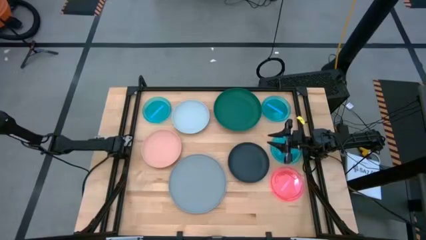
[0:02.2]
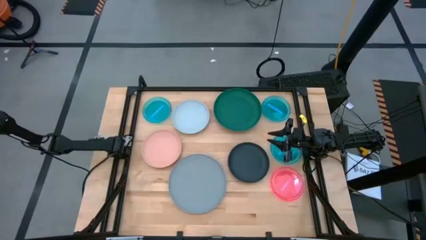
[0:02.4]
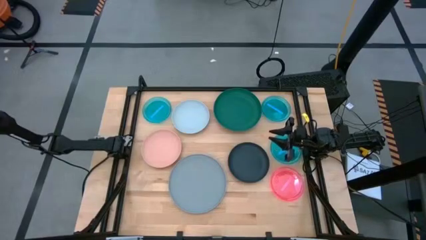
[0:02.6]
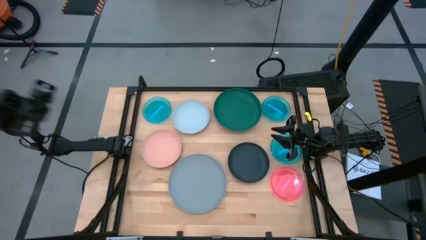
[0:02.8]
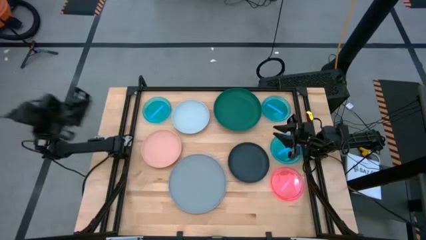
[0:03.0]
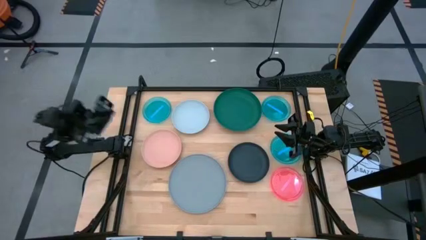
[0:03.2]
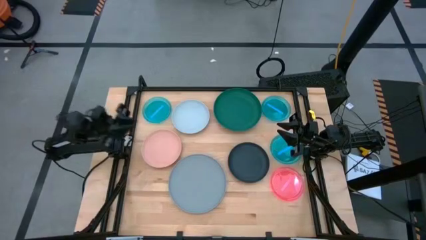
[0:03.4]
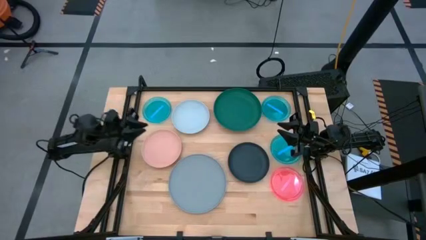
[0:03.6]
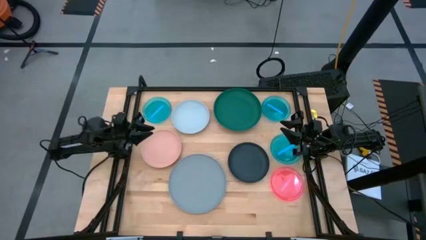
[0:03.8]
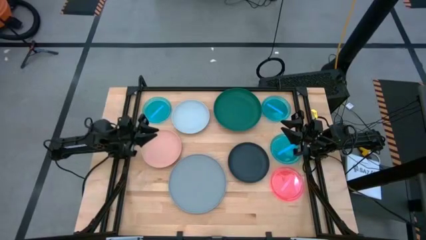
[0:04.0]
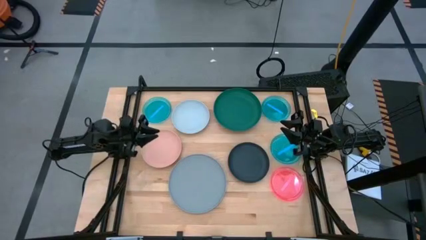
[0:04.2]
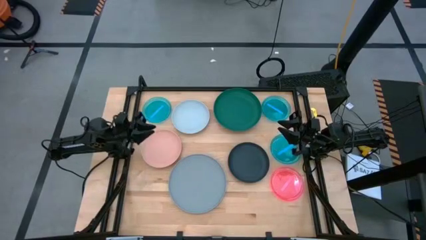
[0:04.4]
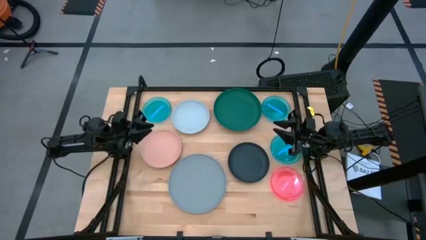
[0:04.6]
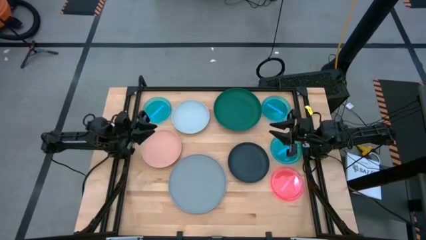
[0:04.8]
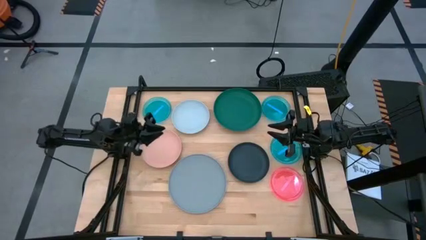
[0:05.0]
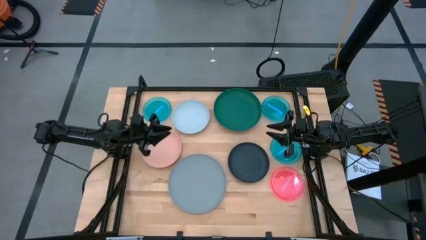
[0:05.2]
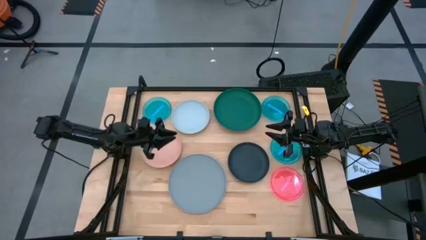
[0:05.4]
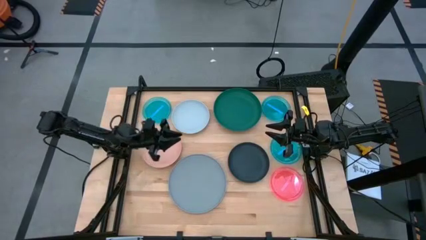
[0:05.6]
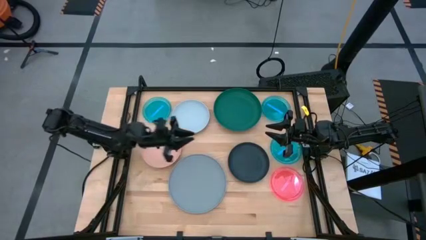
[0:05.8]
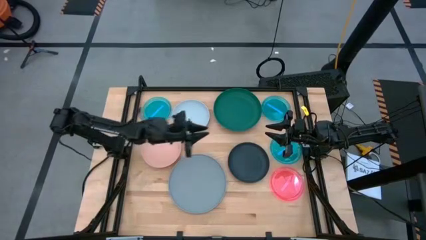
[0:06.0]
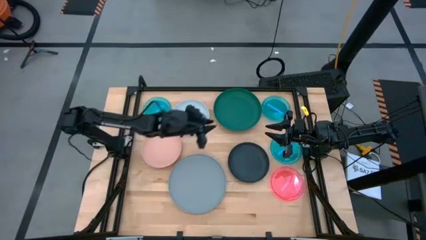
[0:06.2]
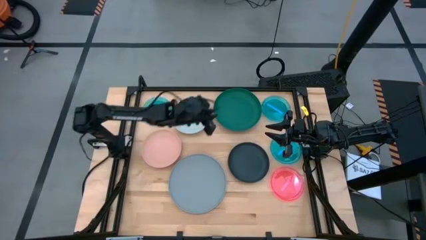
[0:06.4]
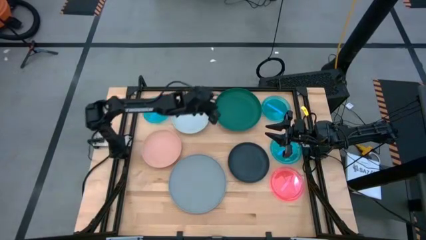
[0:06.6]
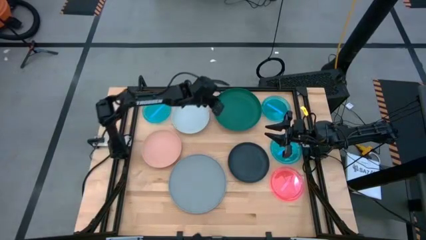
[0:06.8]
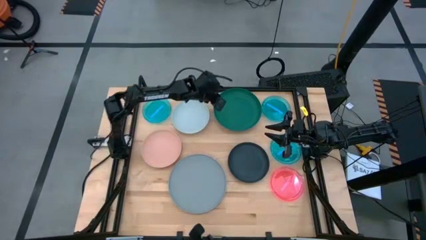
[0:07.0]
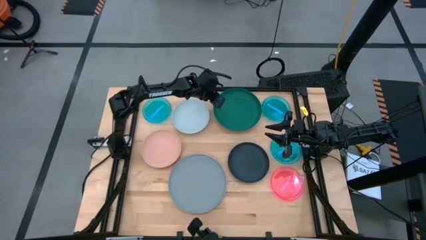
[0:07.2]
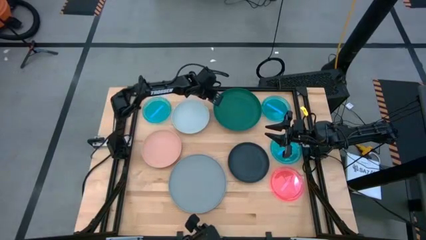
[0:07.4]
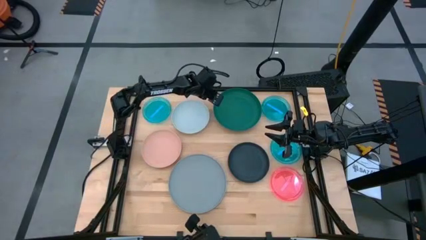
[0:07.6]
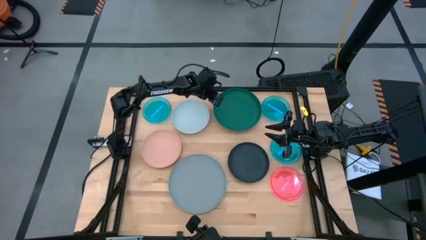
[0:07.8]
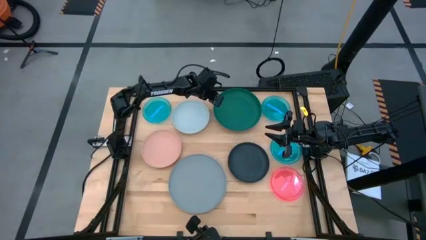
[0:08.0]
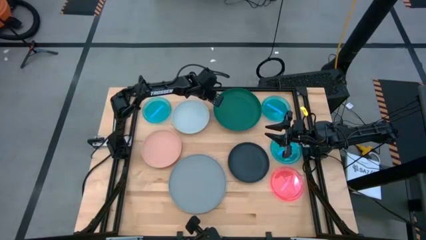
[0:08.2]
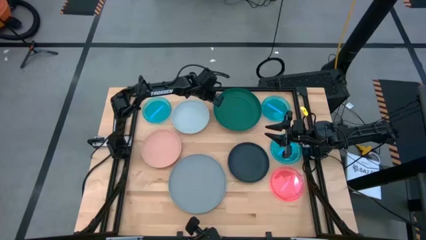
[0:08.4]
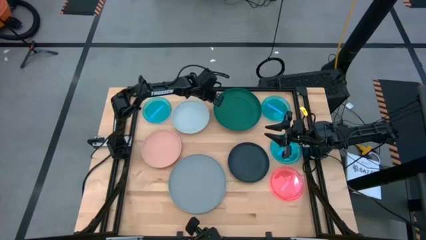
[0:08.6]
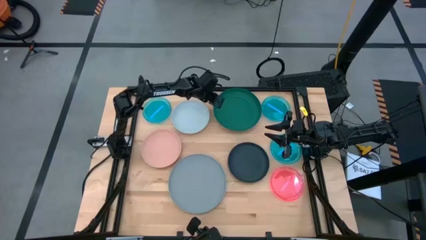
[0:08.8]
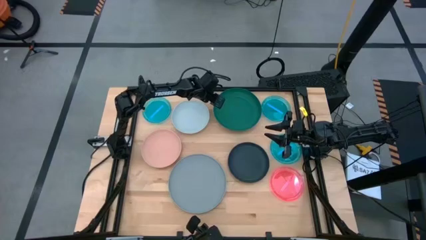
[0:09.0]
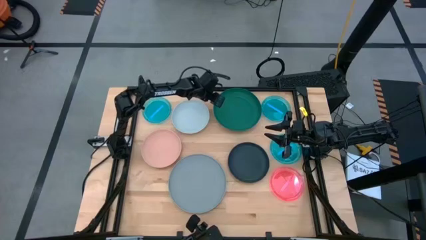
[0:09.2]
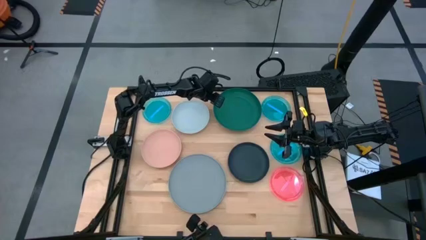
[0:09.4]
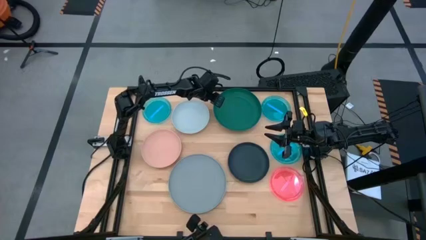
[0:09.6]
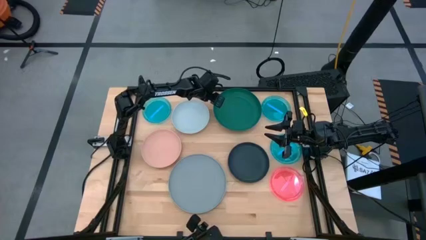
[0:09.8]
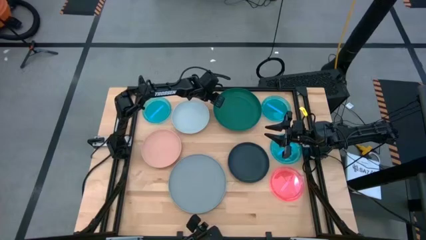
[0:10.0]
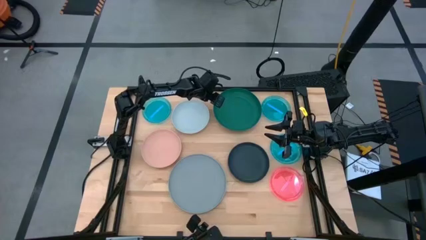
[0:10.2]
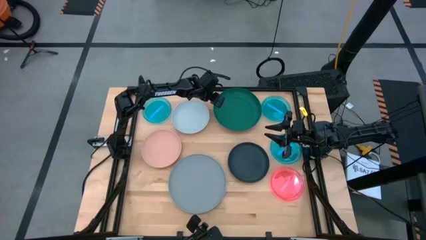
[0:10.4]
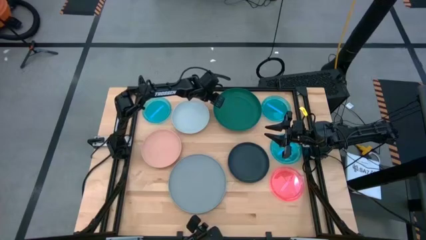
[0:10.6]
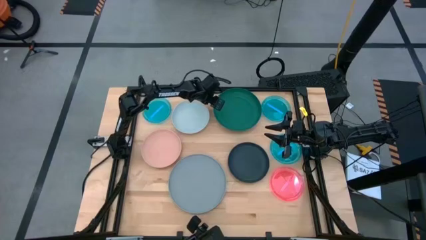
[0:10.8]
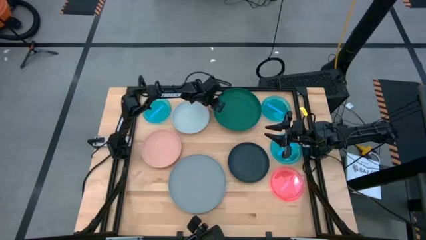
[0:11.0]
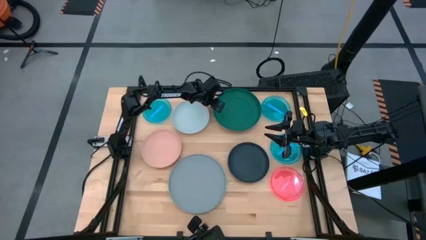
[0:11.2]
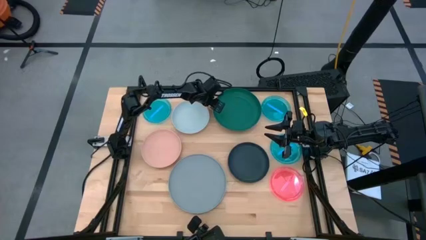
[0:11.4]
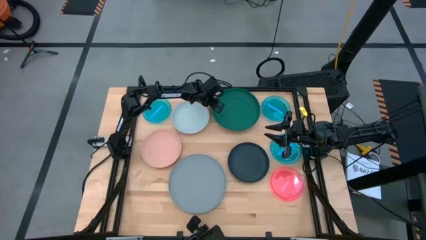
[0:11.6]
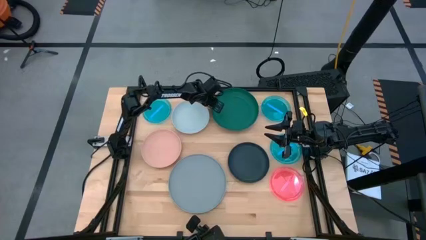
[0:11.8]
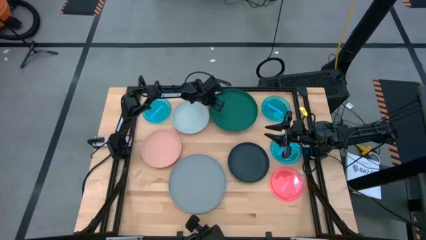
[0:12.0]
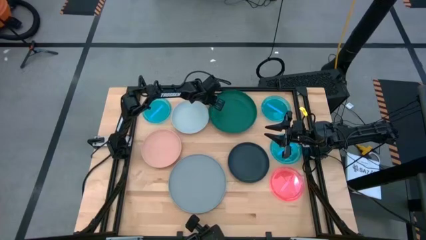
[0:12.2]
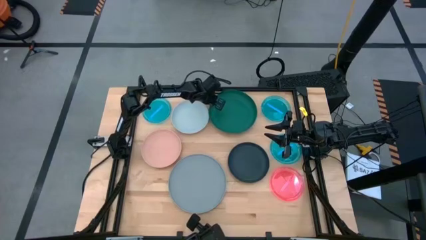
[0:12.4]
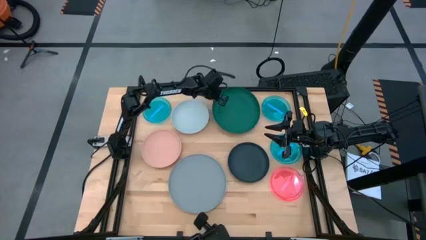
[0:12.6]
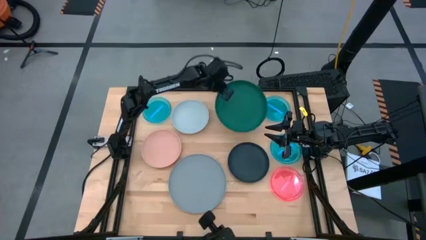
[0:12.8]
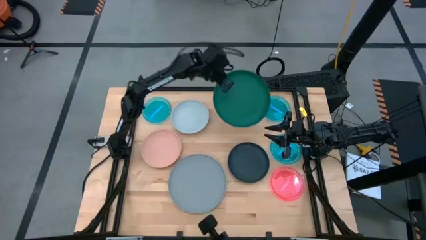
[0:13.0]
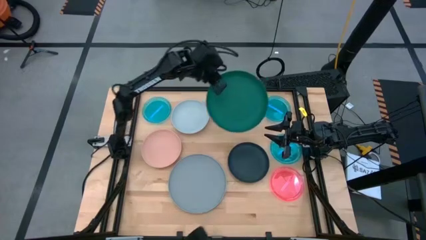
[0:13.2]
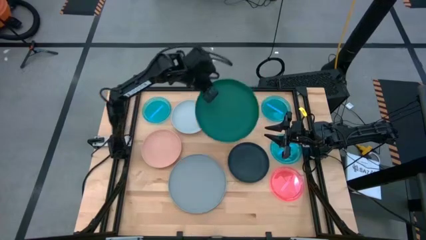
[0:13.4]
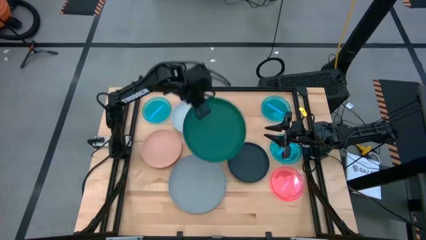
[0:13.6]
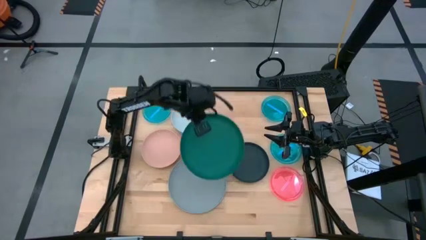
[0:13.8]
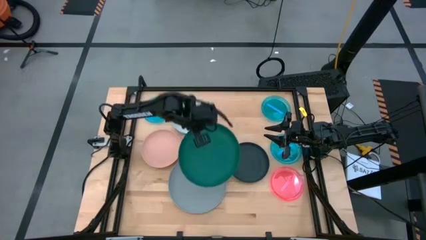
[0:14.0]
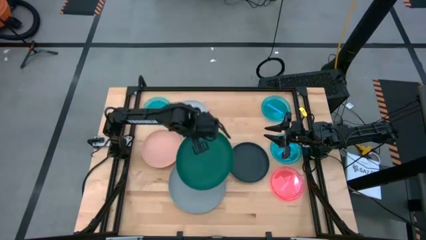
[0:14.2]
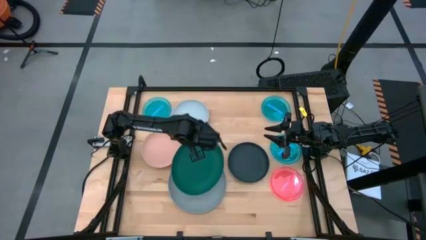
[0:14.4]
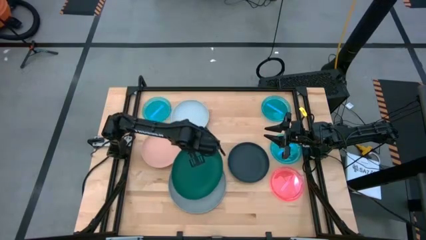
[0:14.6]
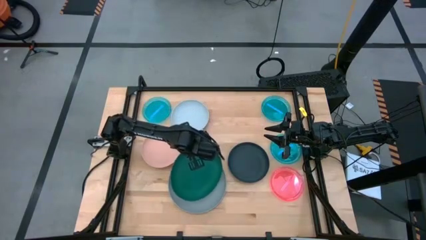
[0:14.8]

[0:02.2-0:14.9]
Task: Stack plastic plates
Stack the green plate on top of the gray plate
